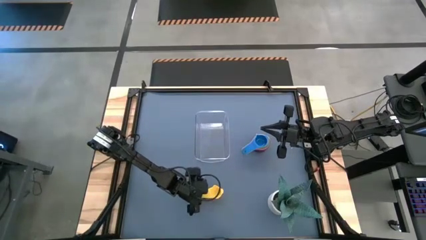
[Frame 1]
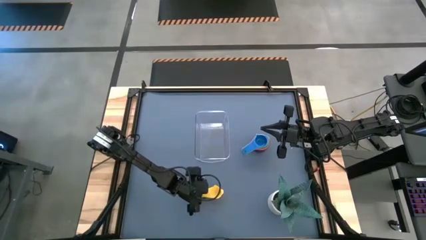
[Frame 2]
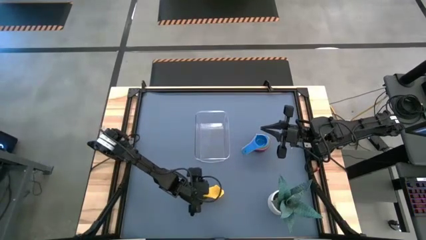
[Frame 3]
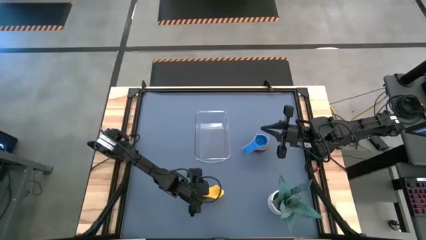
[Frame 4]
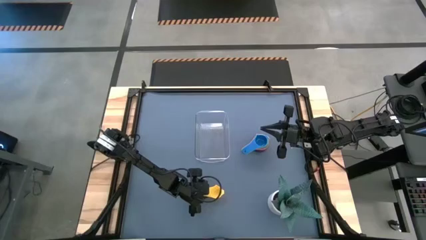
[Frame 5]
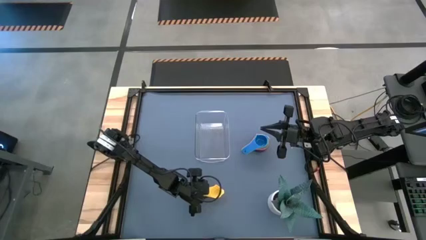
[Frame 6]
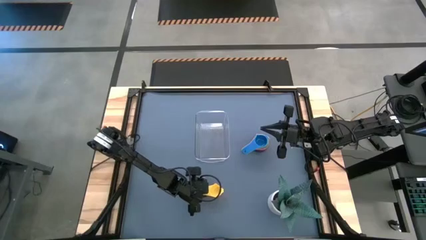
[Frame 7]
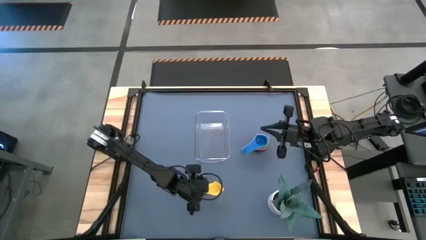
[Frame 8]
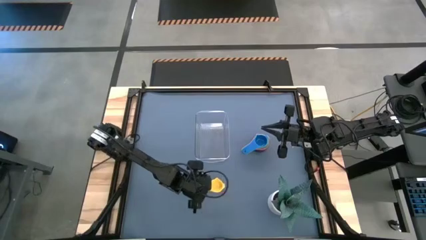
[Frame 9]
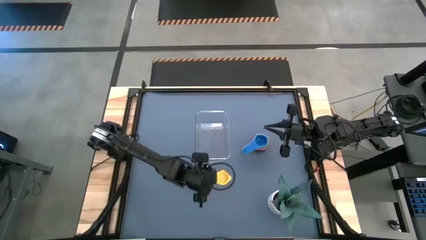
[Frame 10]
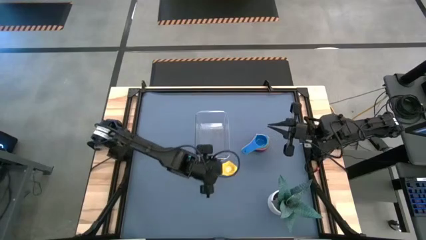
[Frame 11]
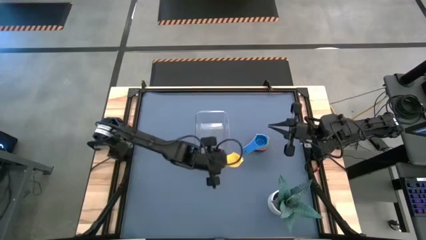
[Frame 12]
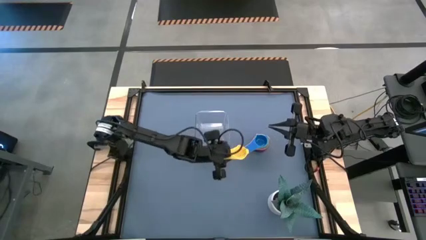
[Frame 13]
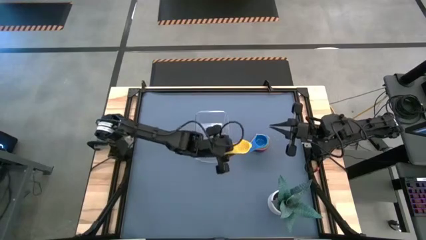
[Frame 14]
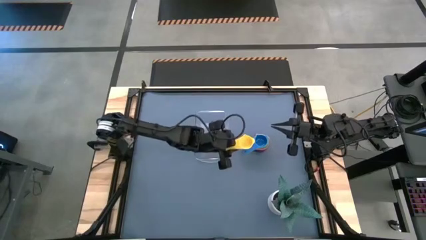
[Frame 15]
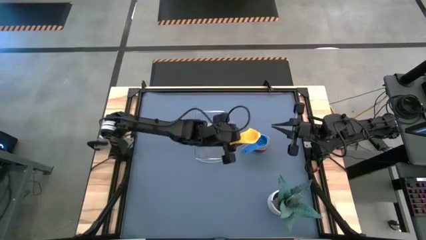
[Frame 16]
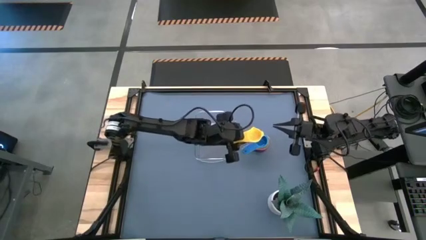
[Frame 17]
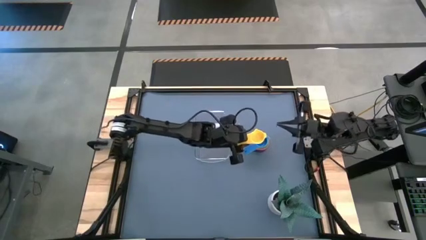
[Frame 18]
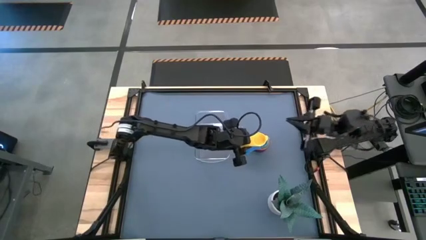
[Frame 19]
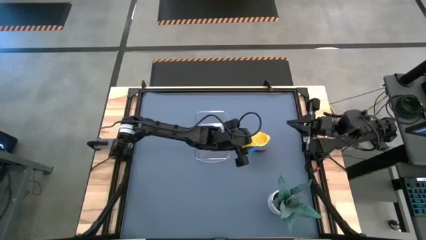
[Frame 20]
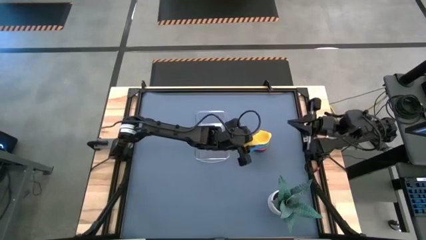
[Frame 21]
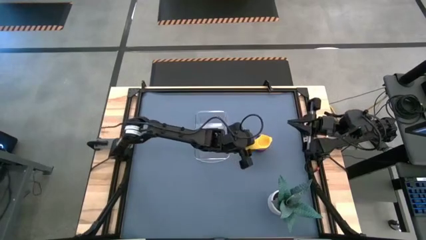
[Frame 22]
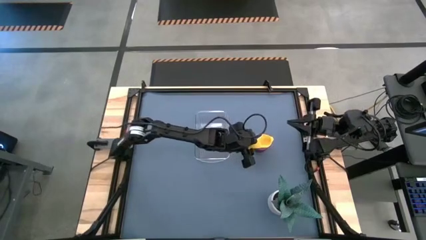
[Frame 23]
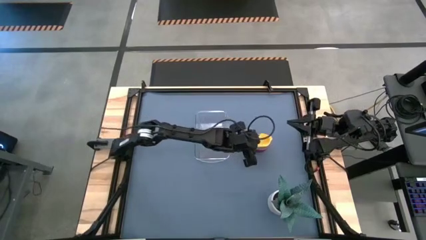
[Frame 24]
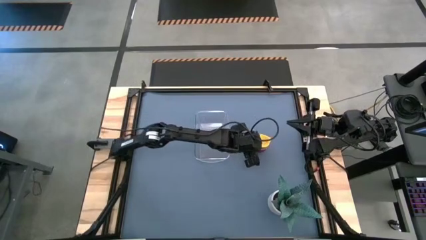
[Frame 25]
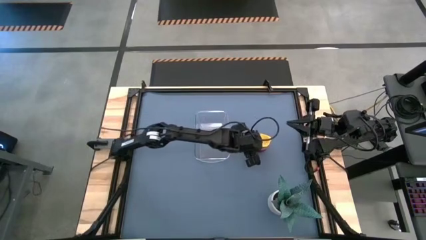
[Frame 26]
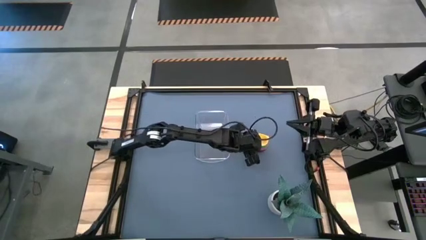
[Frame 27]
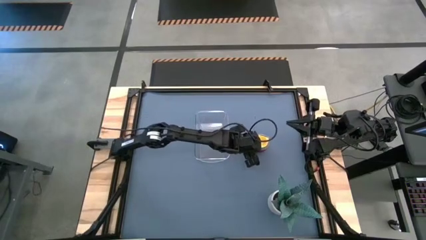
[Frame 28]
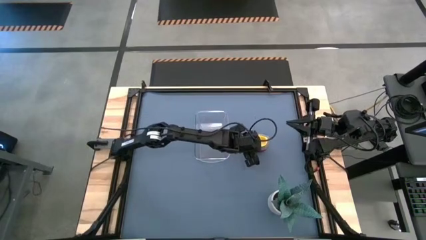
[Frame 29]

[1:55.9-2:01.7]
Task: Nest measuring cups in basket
Stack the yellow measuring cup on top of the blue measuring cup

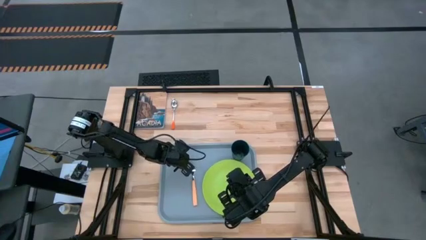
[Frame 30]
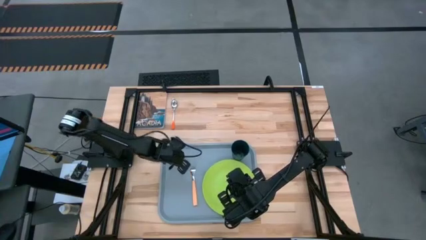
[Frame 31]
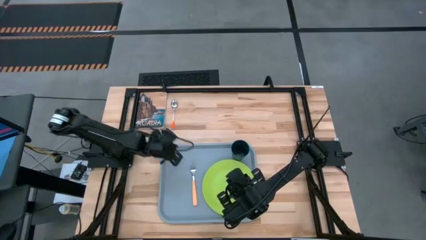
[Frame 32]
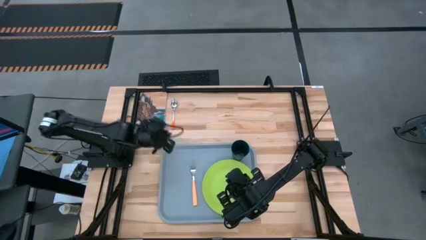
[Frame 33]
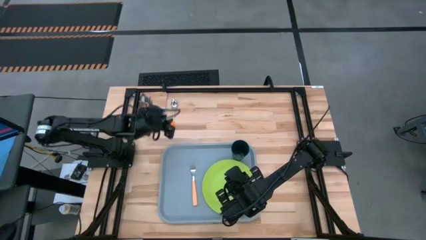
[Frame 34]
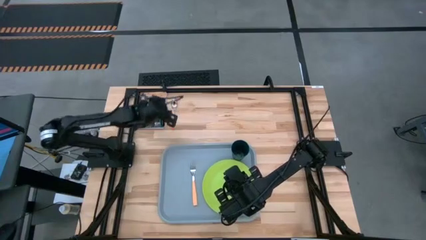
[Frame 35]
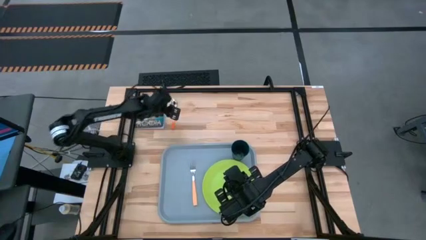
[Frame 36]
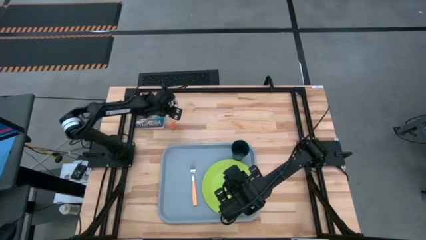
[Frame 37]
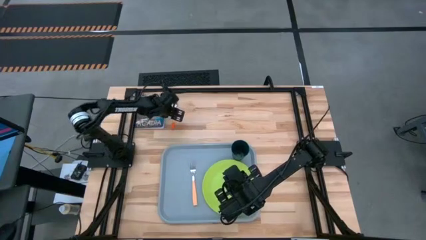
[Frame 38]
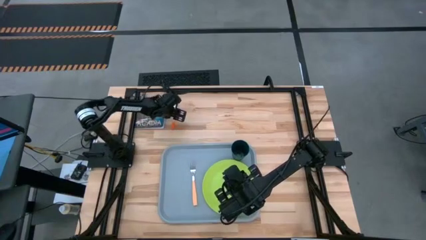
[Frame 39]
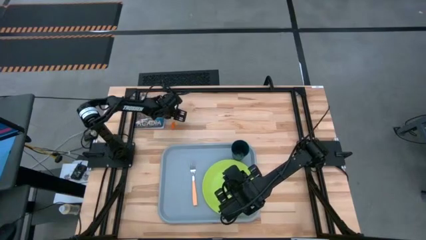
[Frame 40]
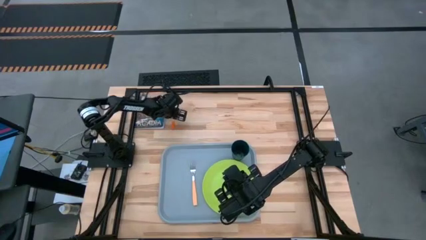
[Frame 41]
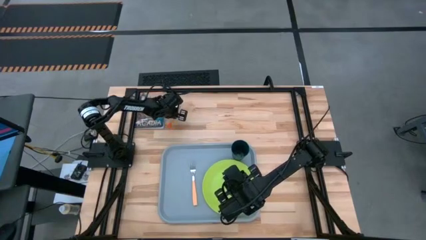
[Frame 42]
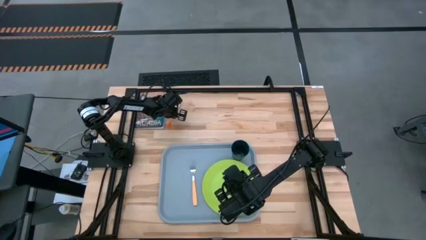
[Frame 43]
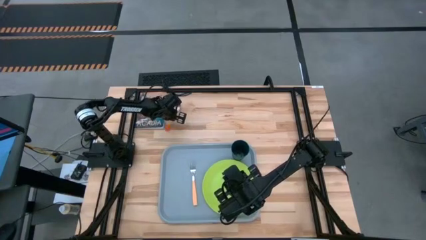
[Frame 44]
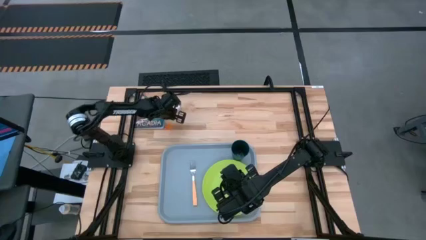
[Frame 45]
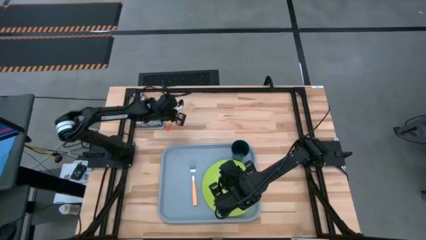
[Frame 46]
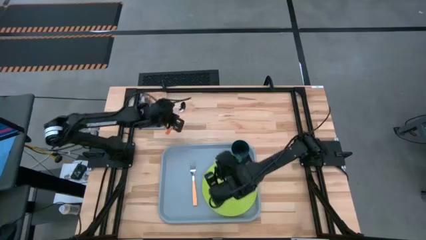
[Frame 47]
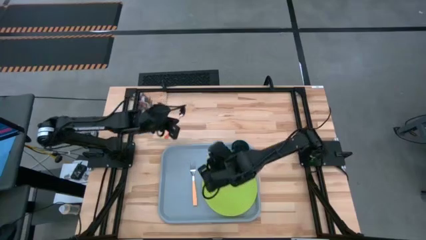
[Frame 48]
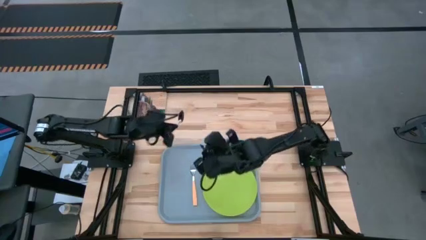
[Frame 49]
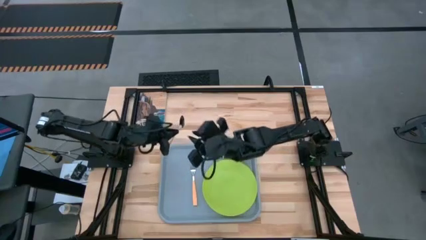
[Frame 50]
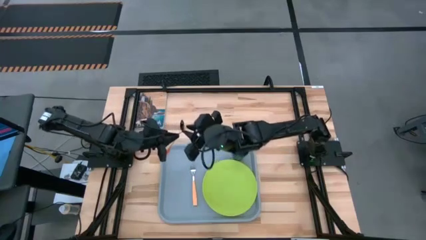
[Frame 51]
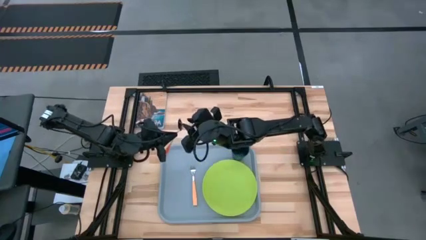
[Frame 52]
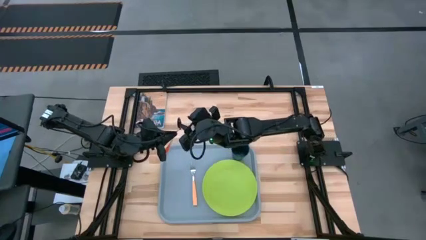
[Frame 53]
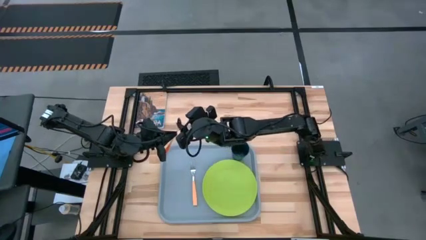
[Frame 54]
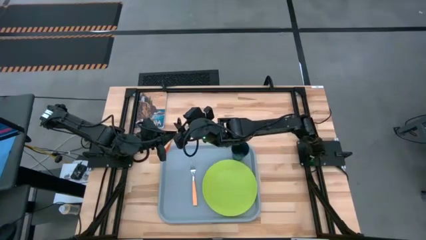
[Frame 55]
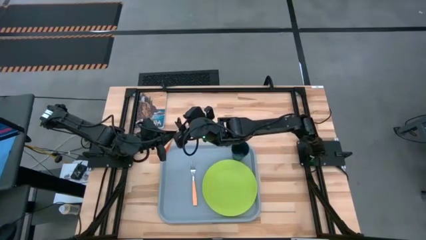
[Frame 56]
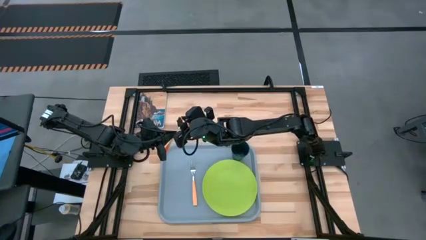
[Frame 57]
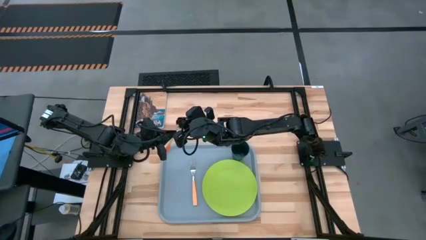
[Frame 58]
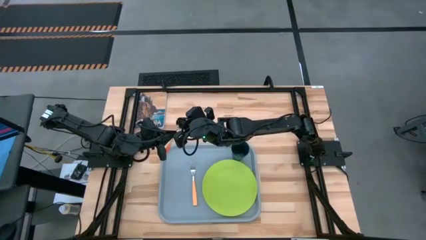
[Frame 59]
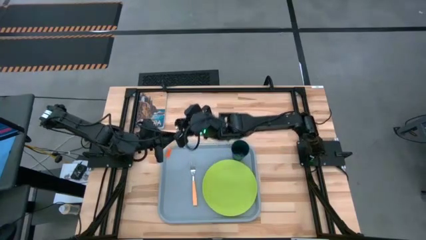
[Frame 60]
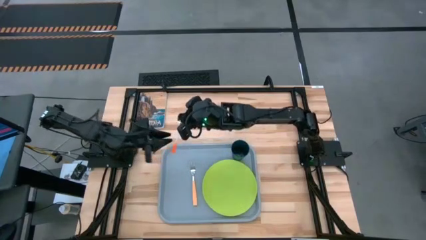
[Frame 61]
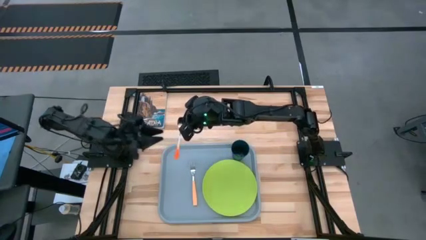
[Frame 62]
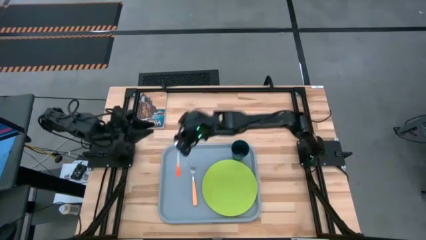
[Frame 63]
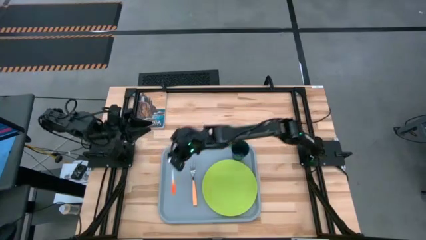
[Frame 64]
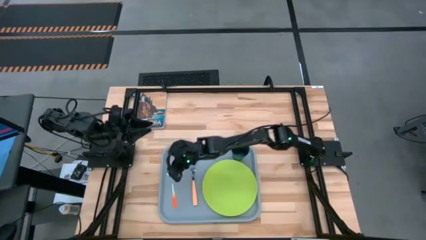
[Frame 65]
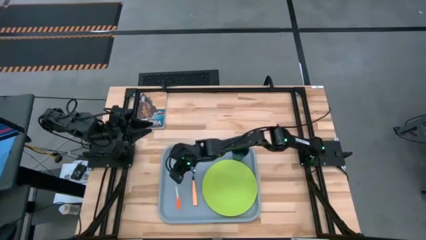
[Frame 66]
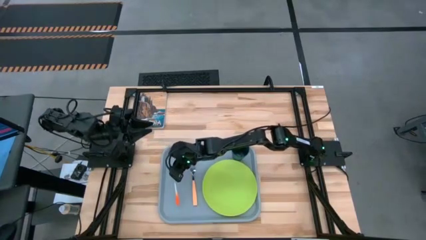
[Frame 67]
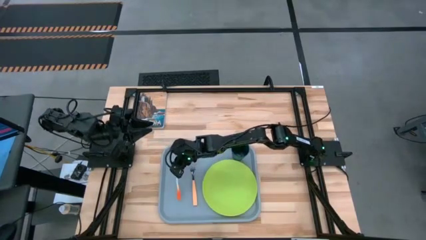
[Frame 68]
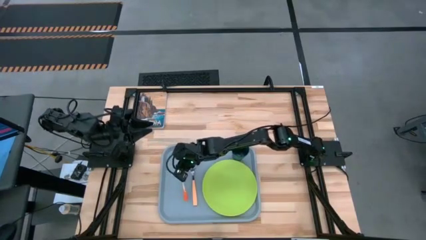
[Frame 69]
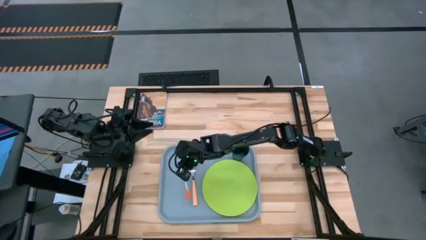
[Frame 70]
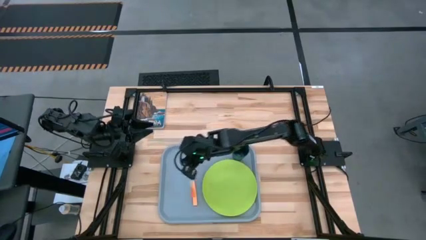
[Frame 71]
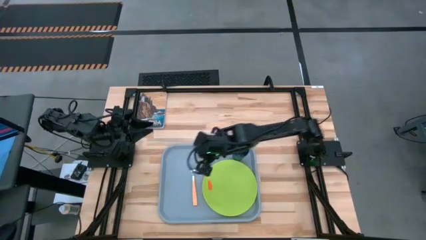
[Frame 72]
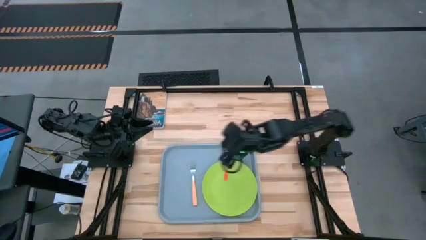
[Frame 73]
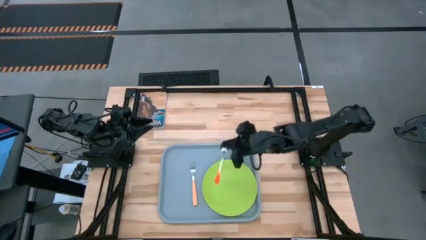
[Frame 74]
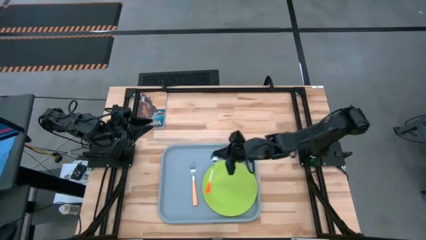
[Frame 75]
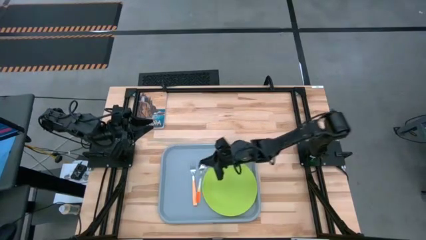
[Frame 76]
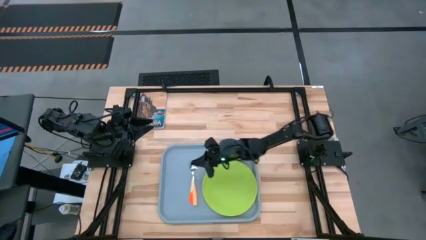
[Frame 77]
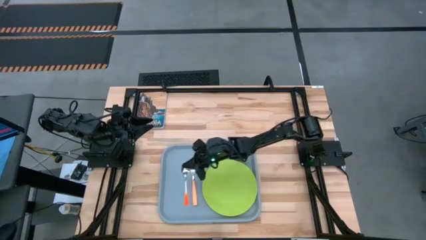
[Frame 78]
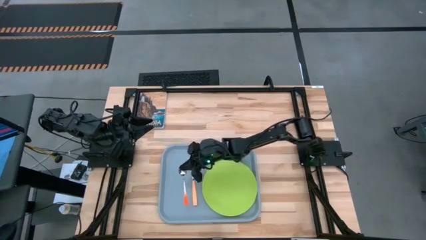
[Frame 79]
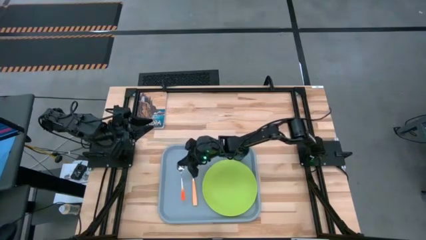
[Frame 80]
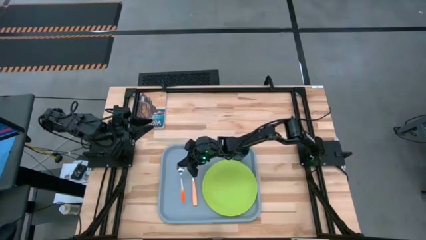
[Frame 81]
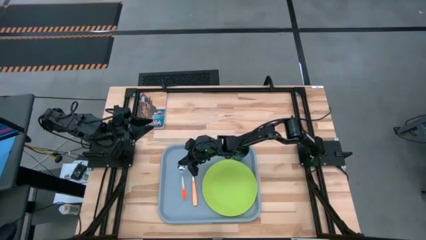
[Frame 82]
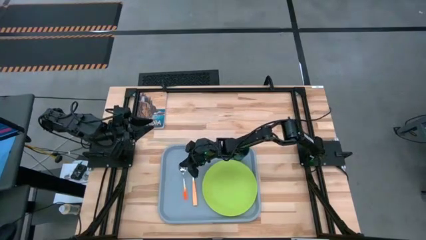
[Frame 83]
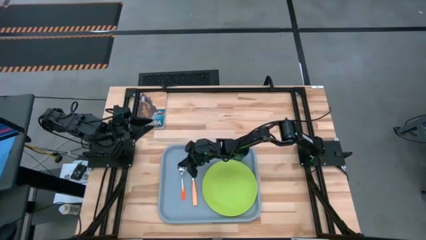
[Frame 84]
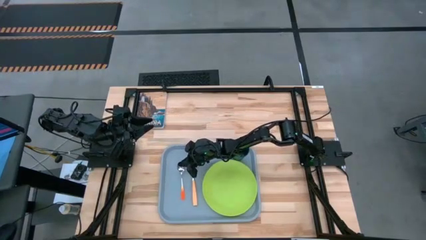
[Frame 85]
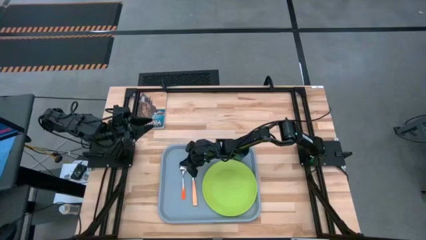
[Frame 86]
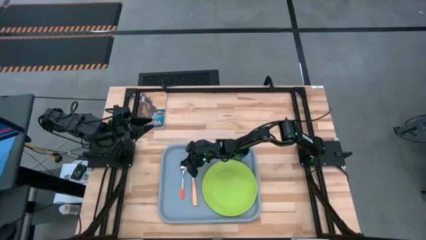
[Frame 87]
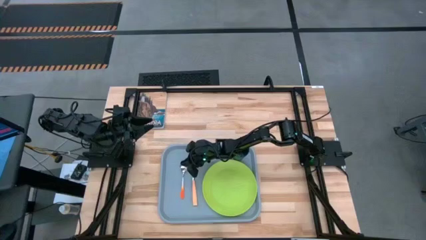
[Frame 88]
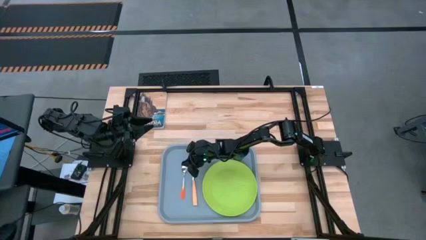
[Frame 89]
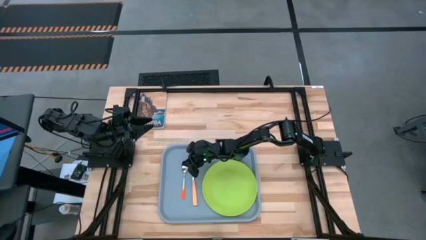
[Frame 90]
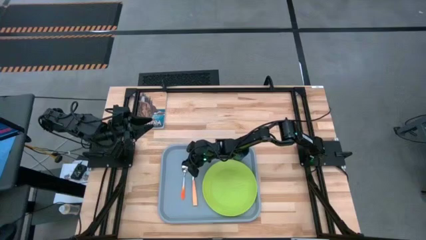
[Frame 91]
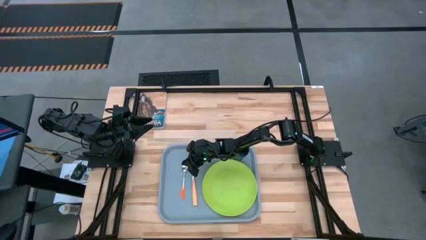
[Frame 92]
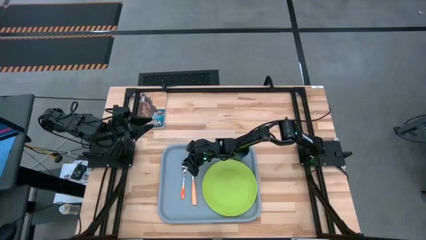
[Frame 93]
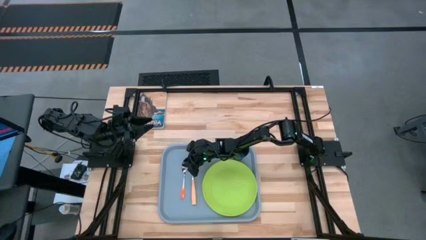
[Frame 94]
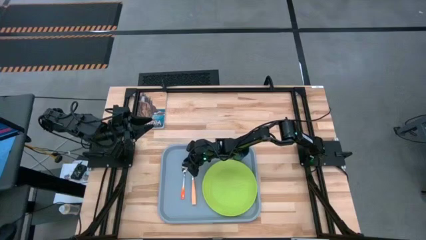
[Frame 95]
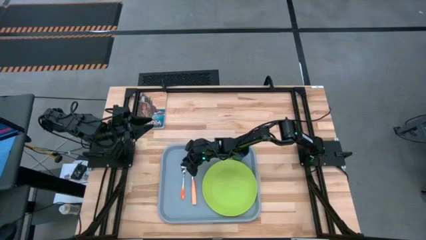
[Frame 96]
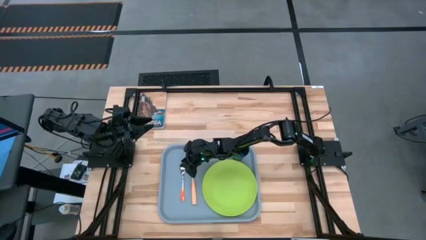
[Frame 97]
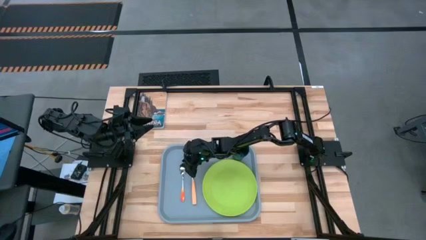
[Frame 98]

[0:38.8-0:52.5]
Task: Pick and place plate/cup/fork/spoon on tray
Put the orange spoon on the blue tray to the left of the yellow fork
